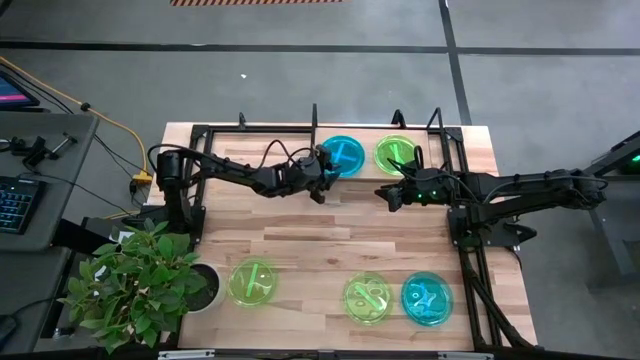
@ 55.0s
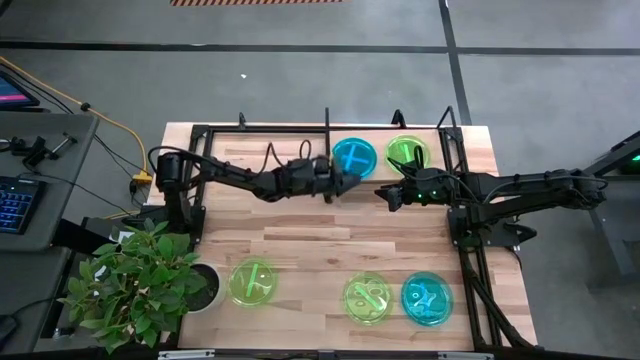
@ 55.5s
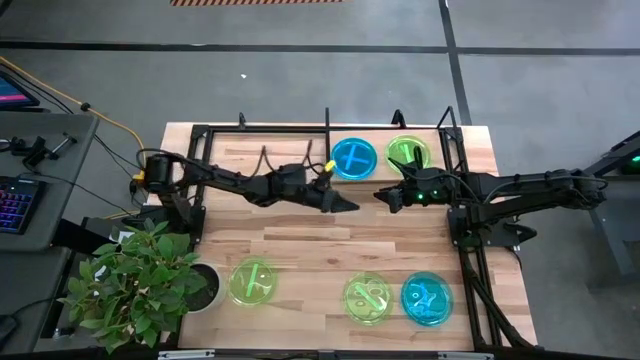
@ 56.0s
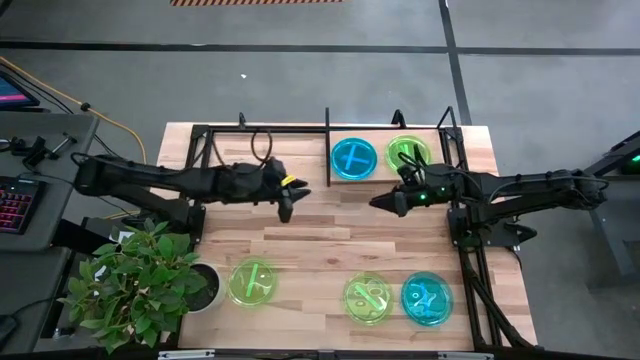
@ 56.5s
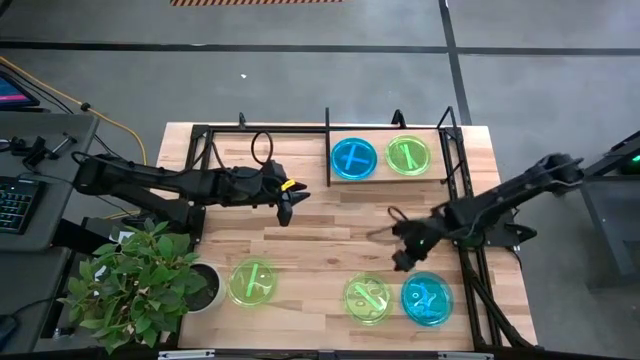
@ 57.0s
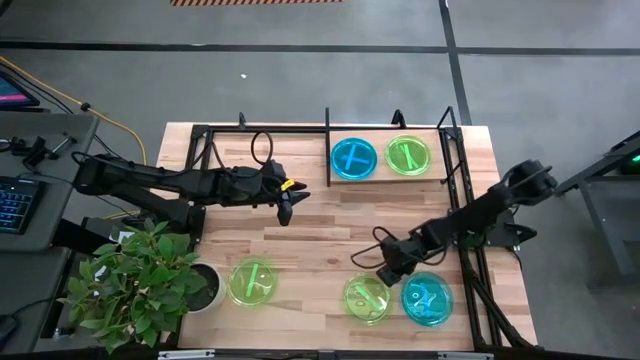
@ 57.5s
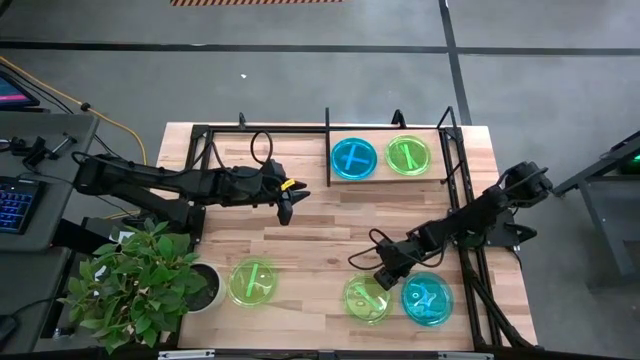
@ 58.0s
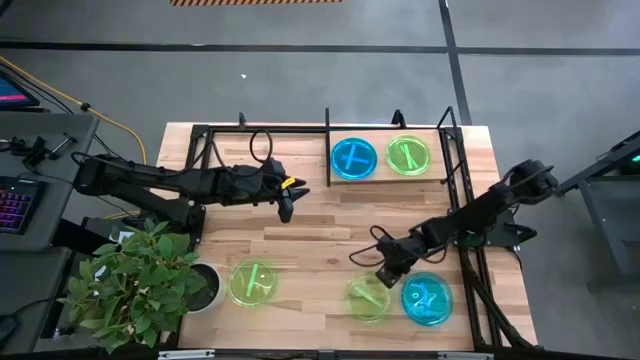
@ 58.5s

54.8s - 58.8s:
Task: Place and stack plates onto a shelf
Stack the right green plate on top of the green plate on the shelf

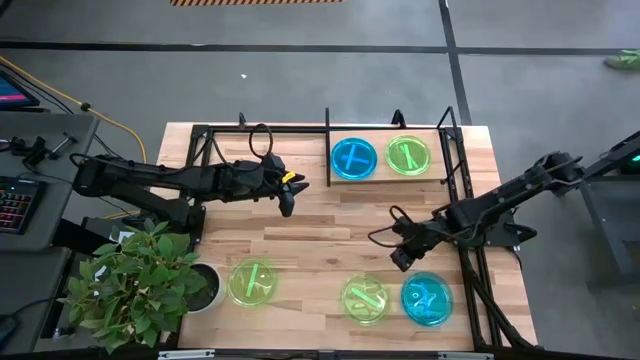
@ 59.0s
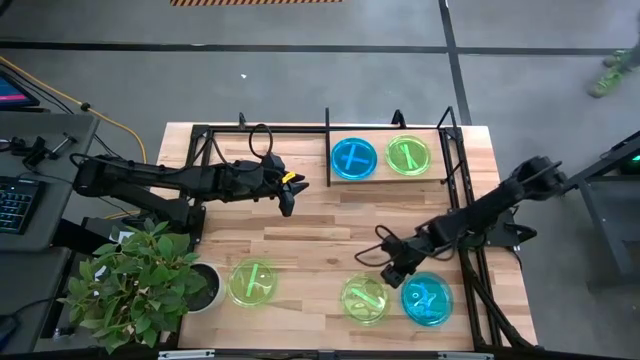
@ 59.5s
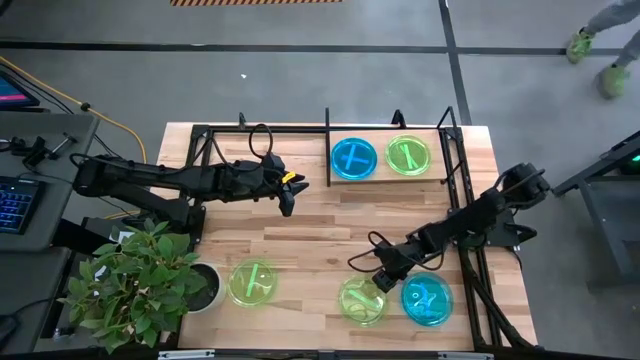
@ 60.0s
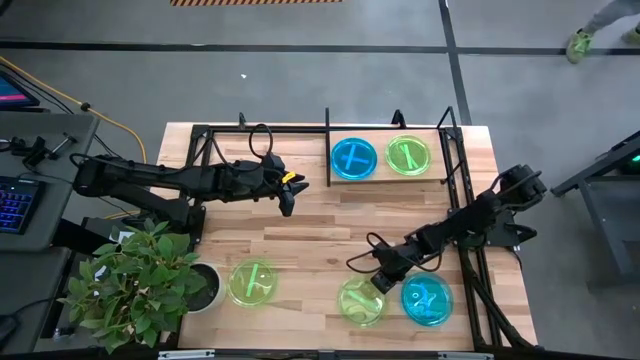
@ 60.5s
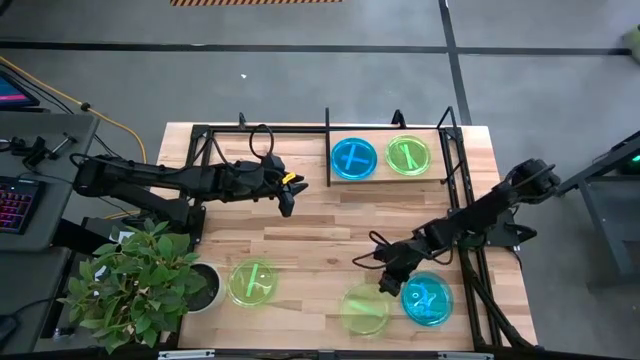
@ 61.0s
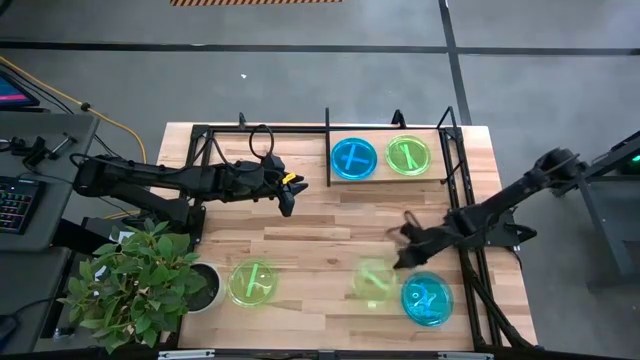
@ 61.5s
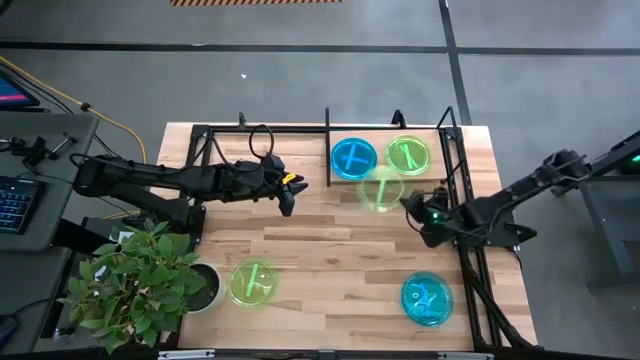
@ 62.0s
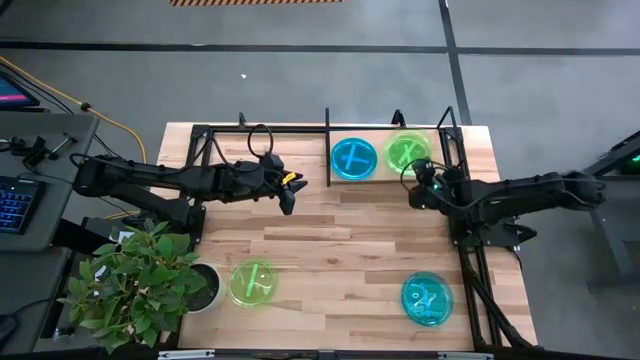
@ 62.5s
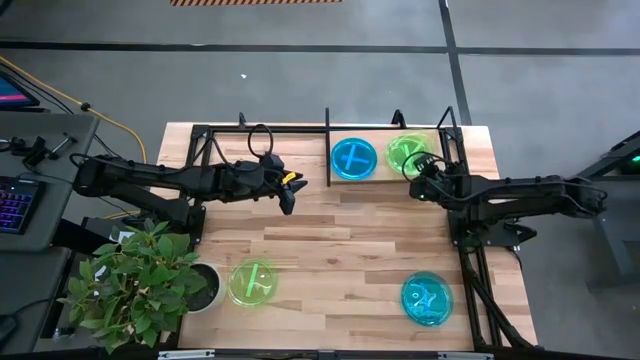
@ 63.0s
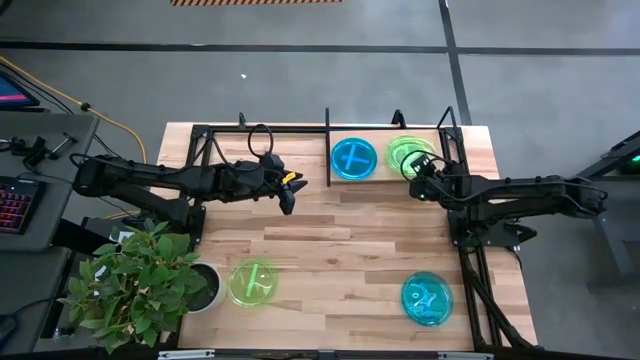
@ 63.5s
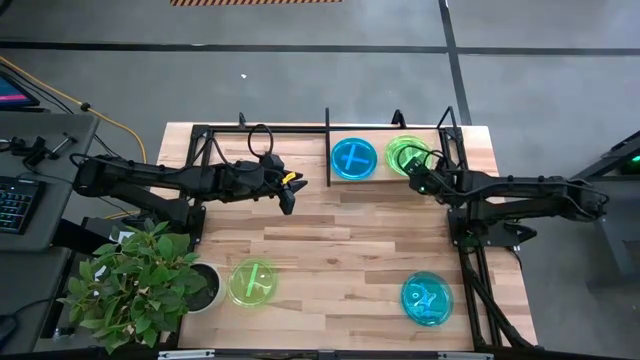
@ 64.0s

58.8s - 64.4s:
Stack the right green plate on top of the stacked green plates on the shelf

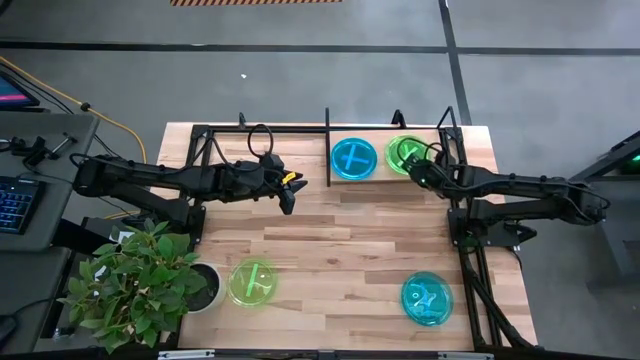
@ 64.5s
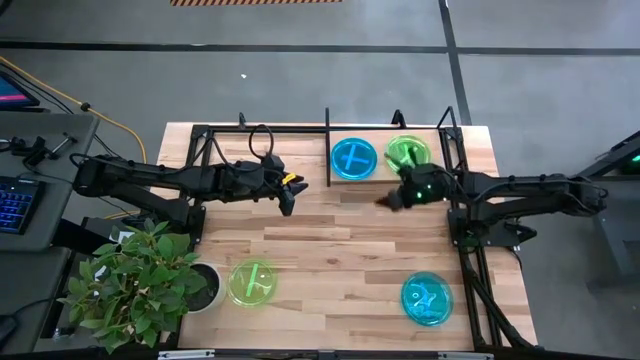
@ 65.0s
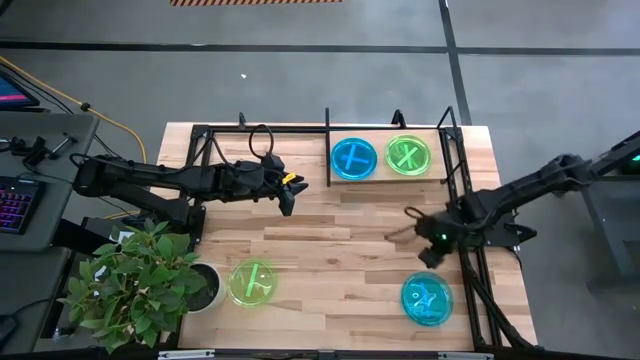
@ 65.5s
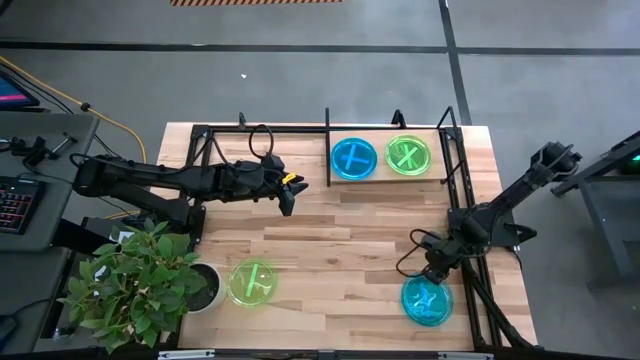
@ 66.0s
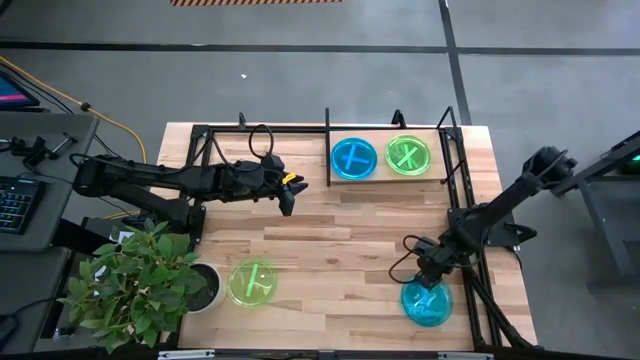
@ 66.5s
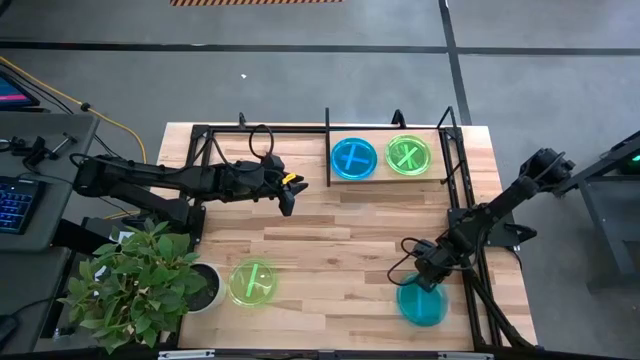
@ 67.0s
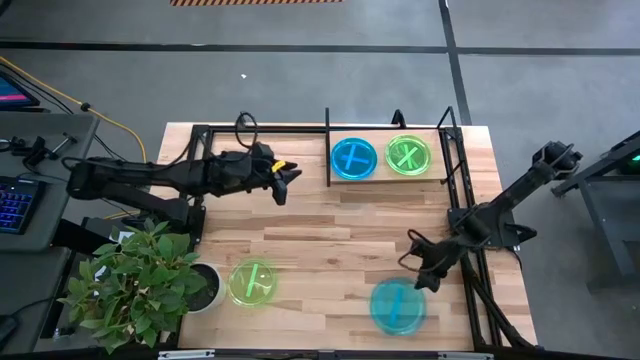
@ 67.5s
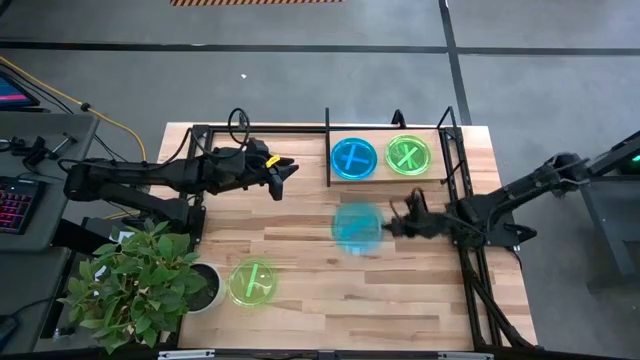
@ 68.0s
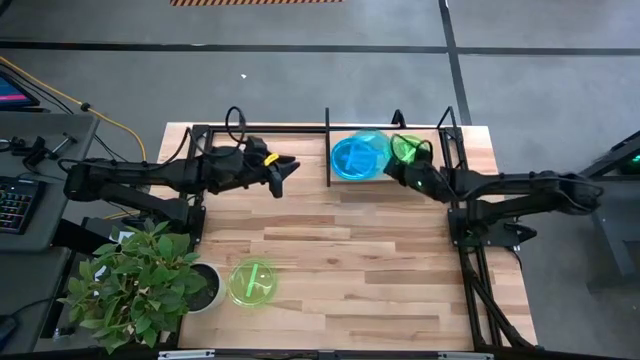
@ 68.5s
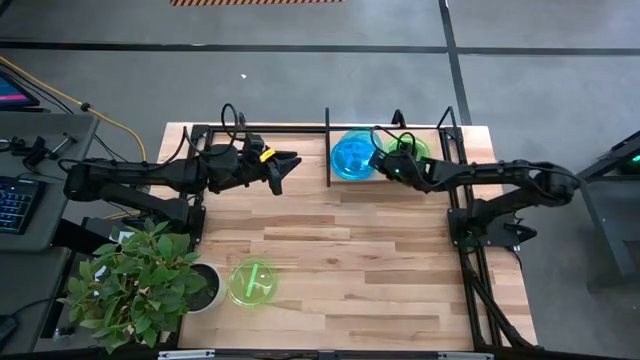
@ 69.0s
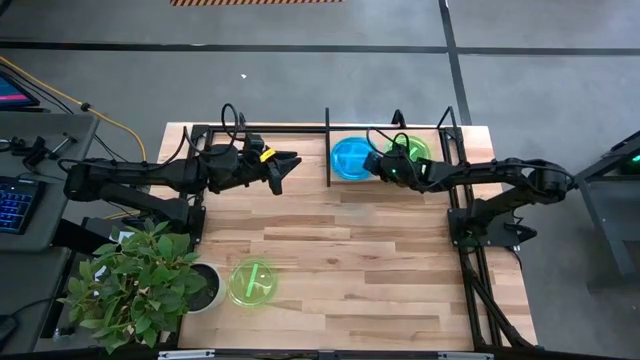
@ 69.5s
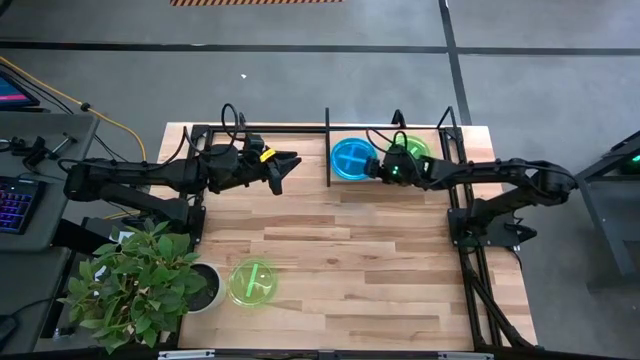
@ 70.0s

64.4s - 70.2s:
Stack the blue plate on top of the stacked blue plates on the shelf

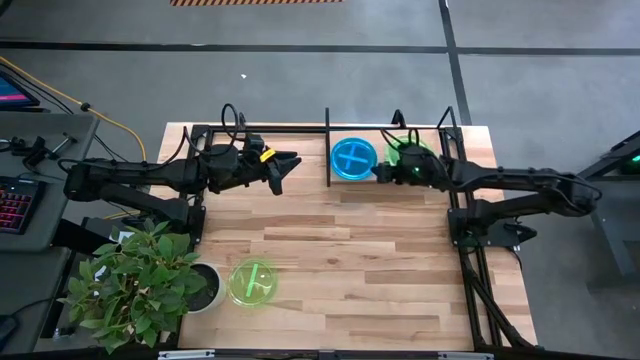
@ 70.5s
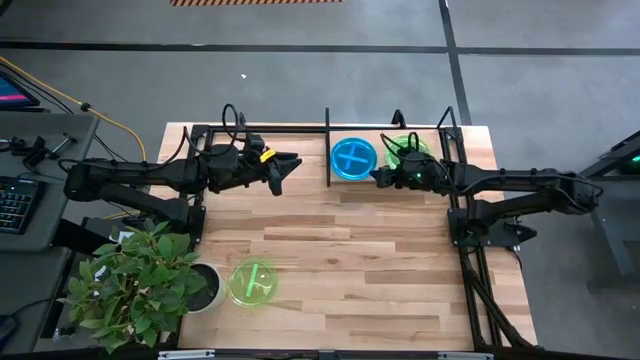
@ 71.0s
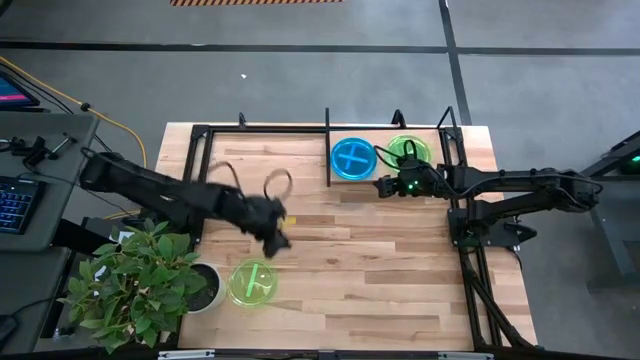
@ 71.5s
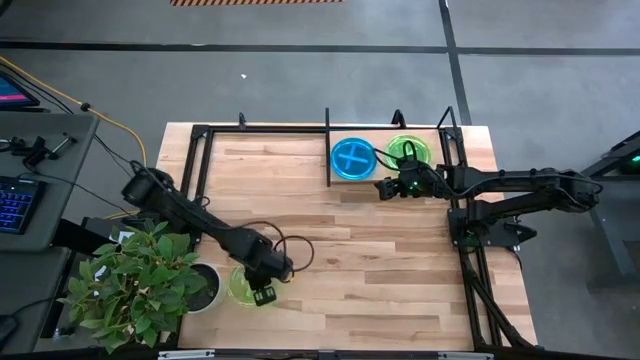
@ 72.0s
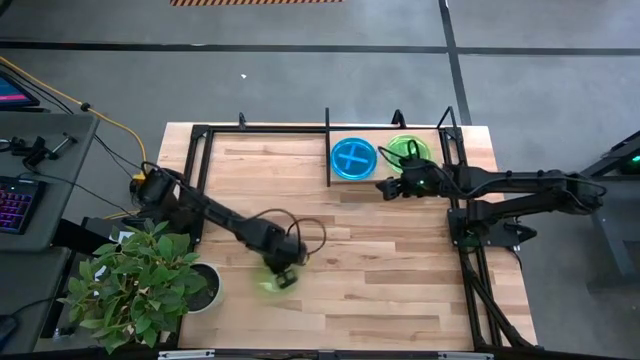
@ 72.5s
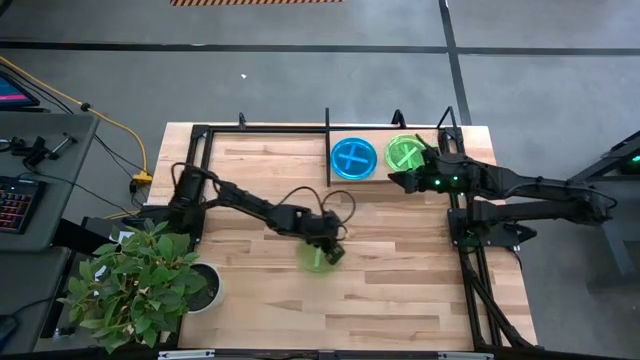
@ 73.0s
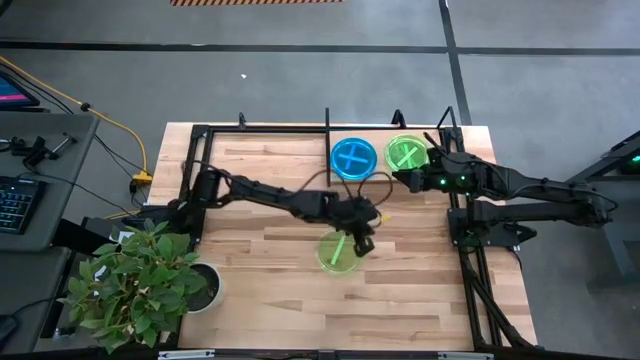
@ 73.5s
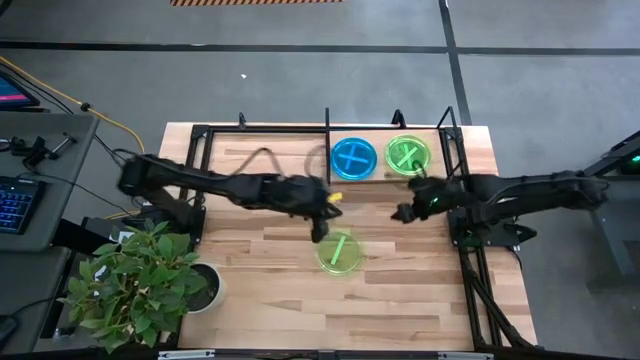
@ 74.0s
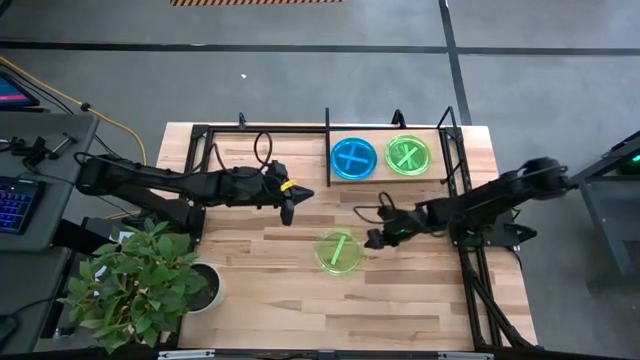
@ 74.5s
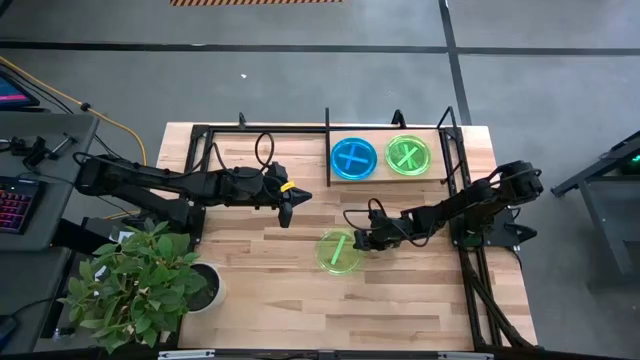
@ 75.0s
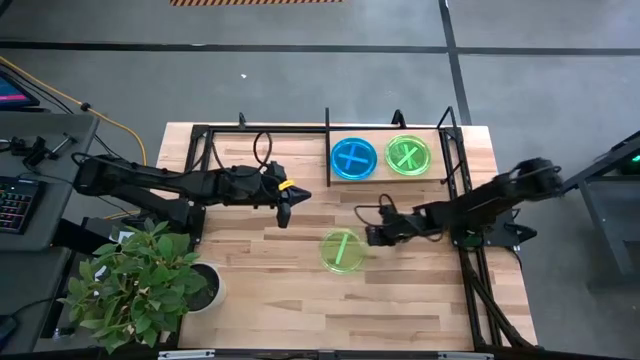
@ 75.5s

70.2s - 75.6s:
Stack the green plate on top of the green plate on the shelf
